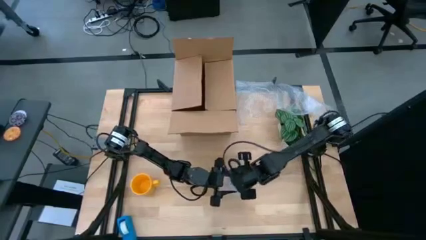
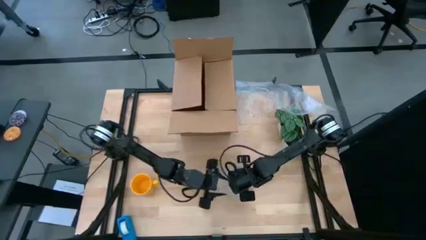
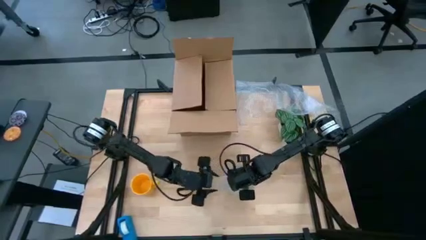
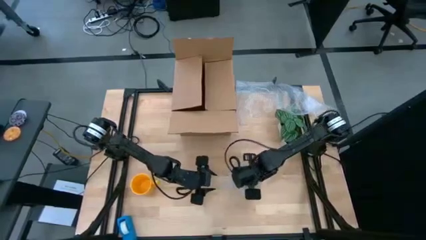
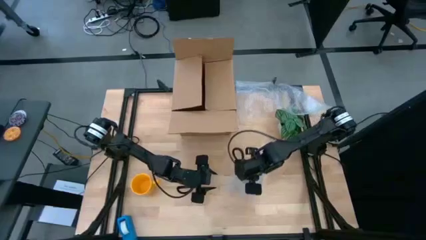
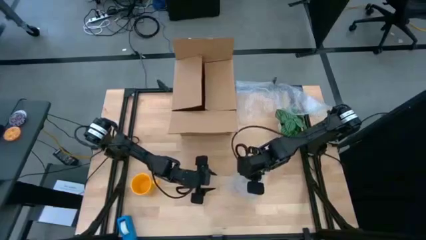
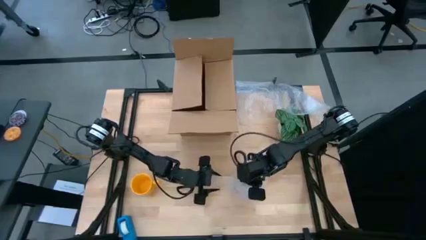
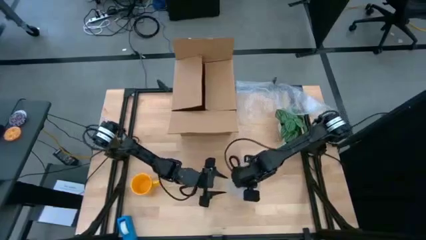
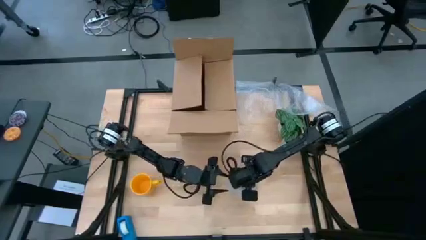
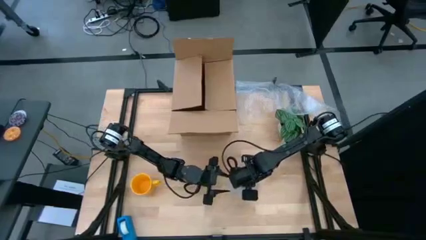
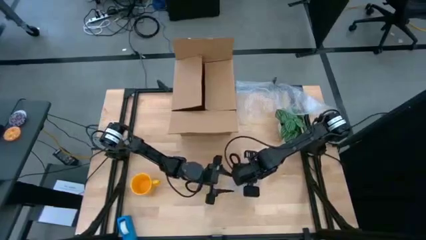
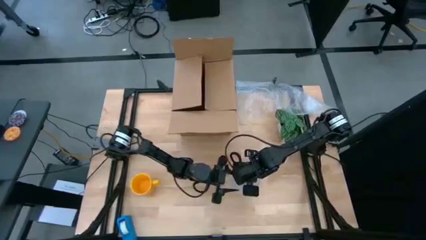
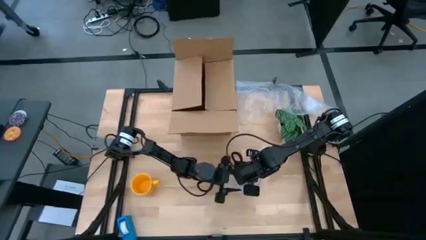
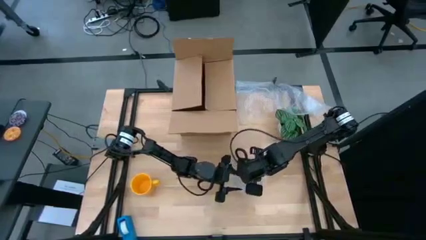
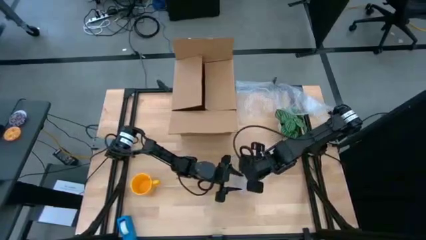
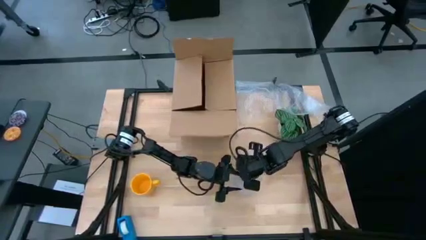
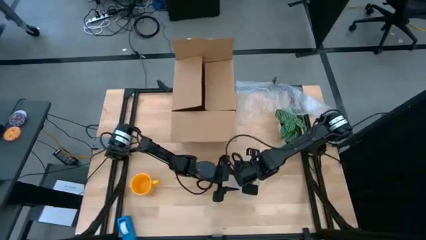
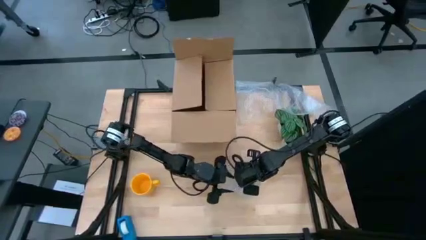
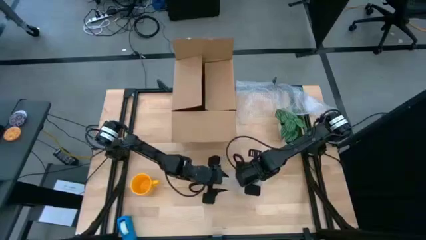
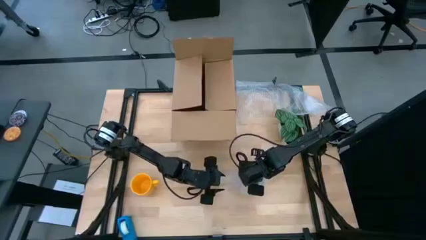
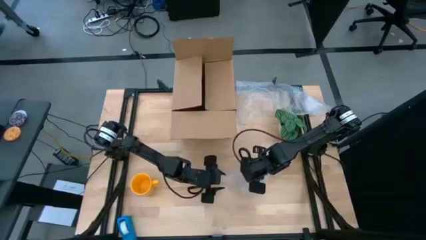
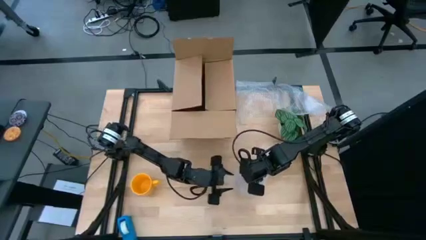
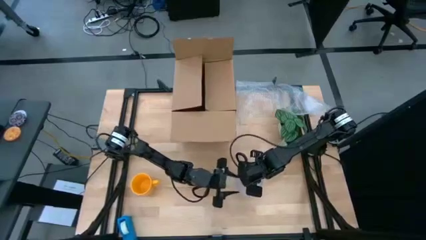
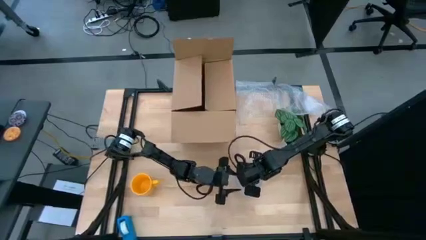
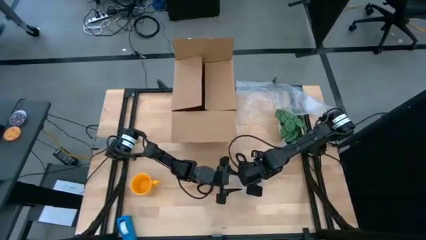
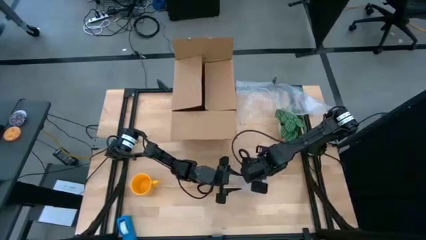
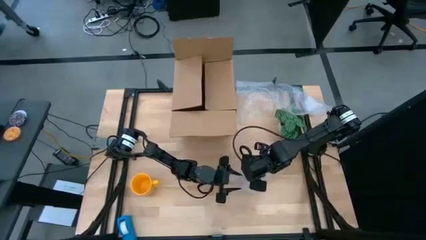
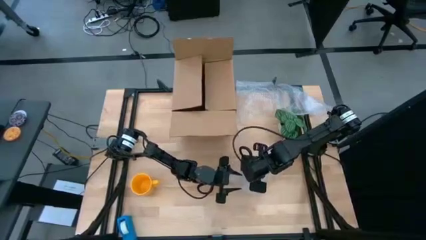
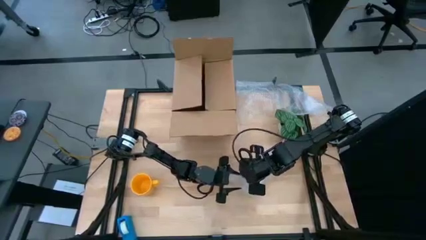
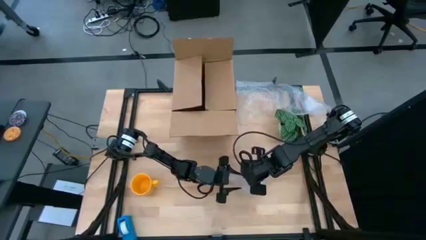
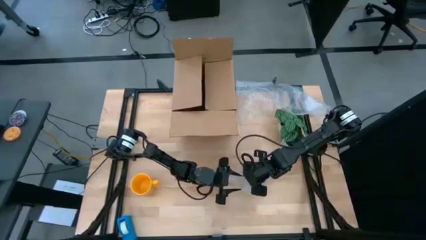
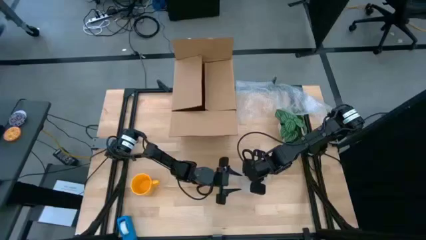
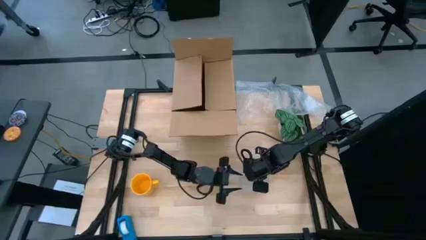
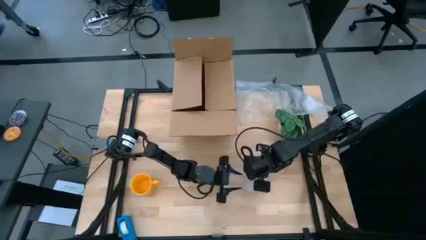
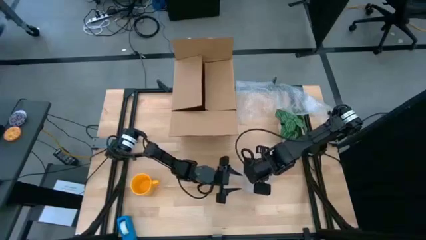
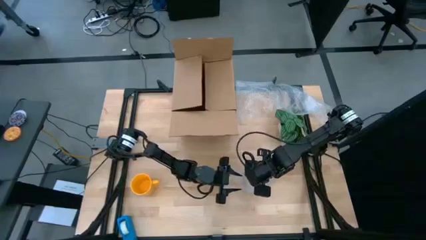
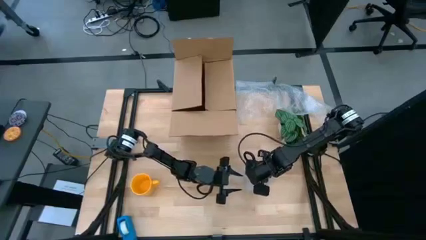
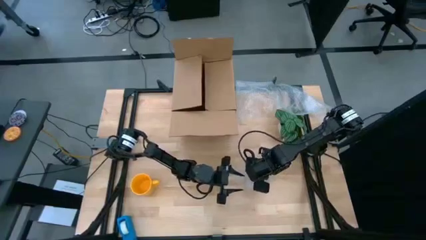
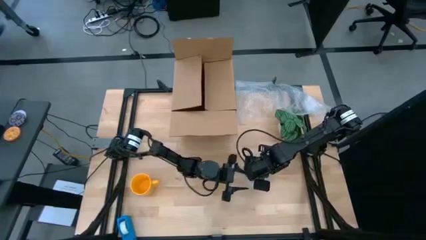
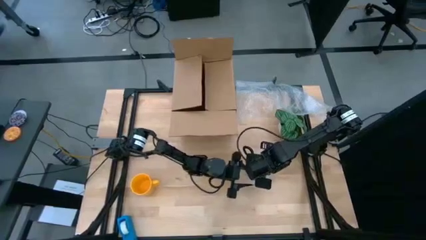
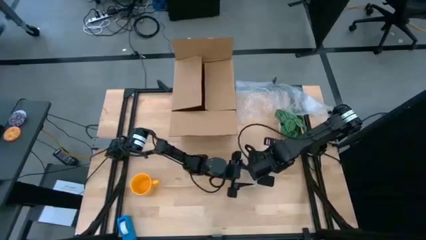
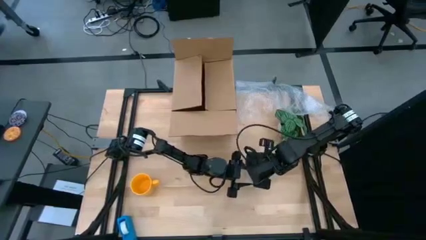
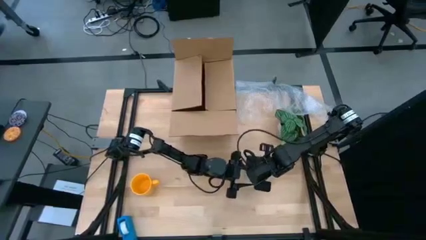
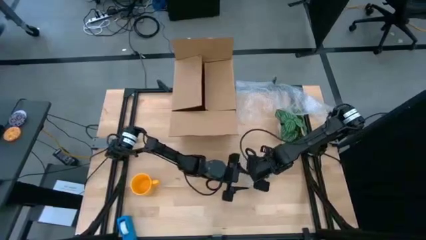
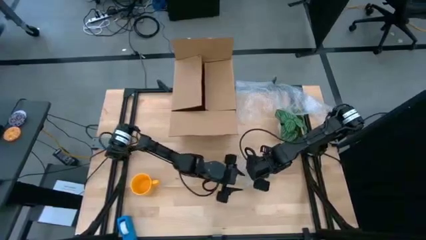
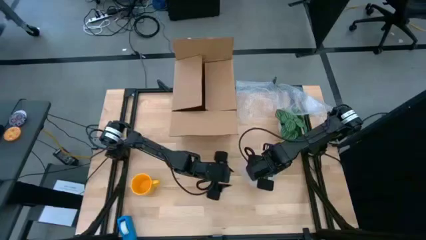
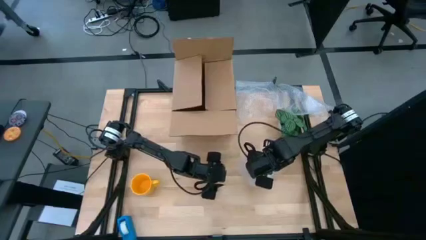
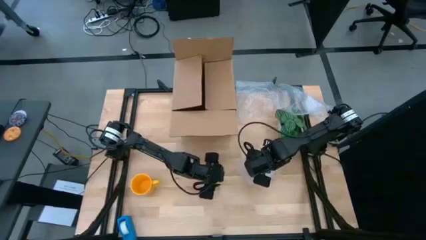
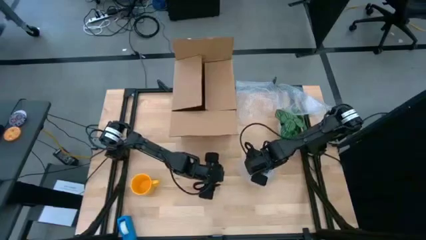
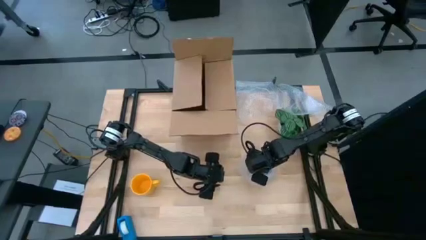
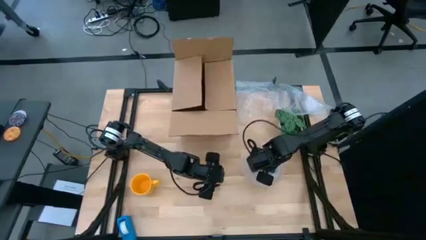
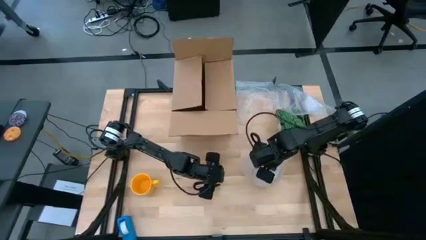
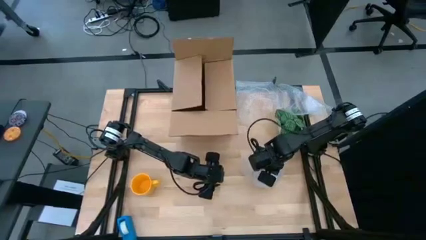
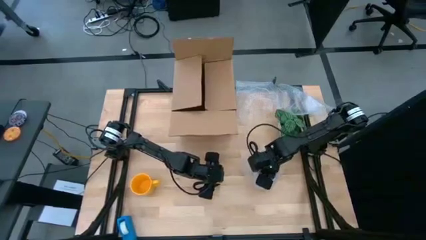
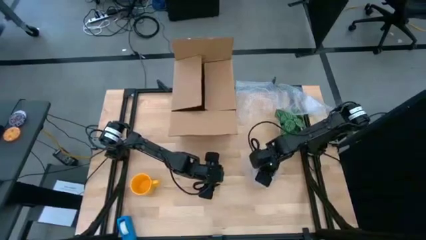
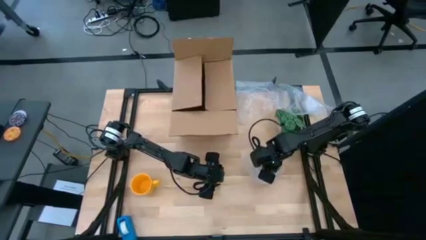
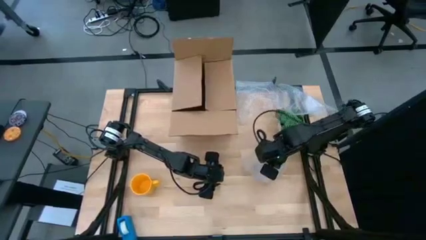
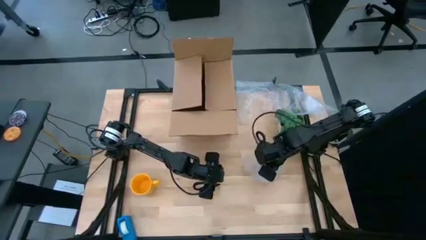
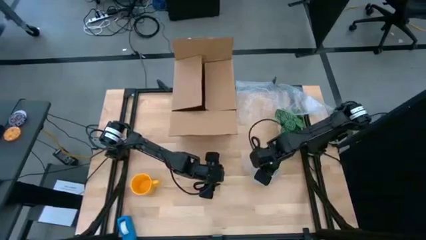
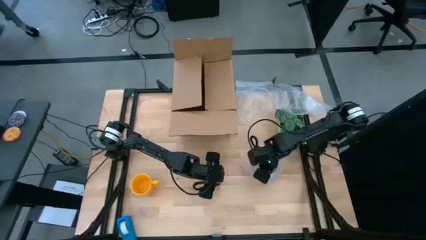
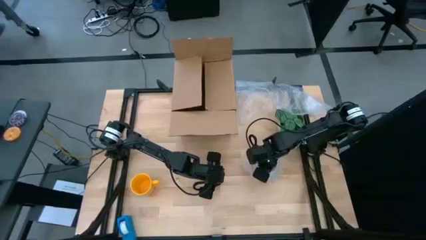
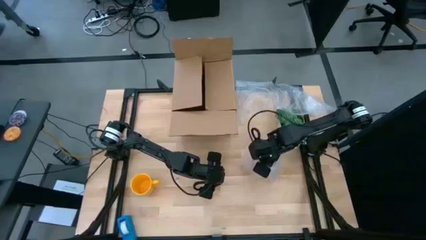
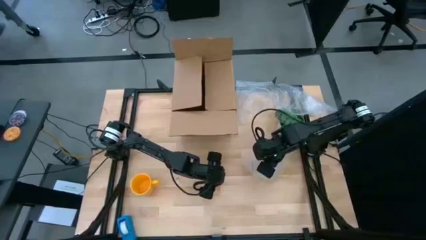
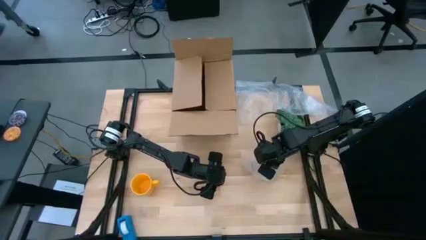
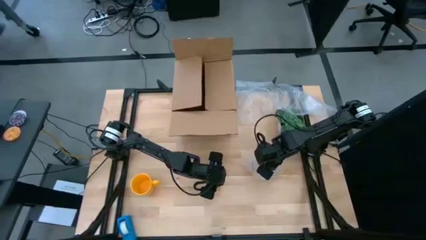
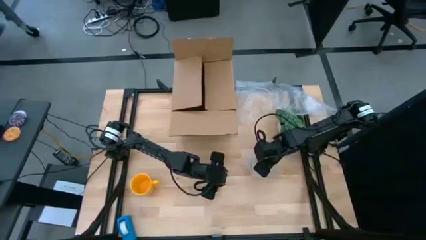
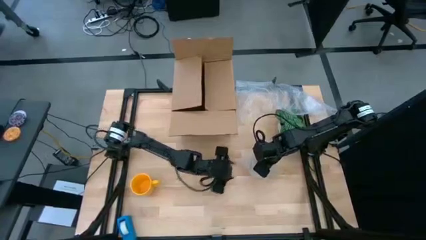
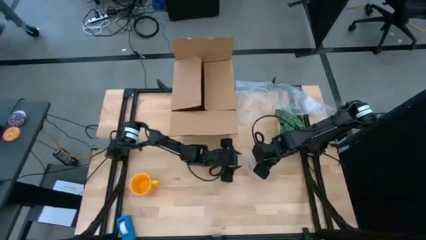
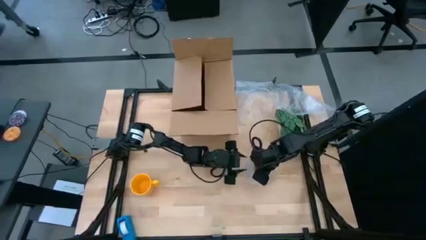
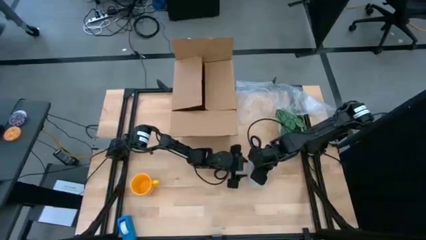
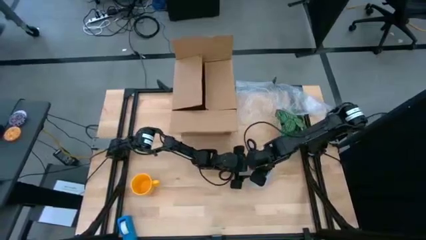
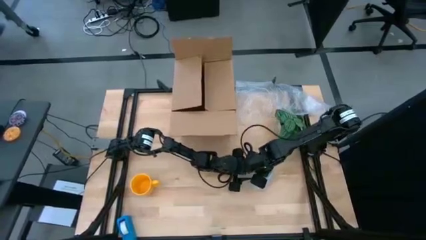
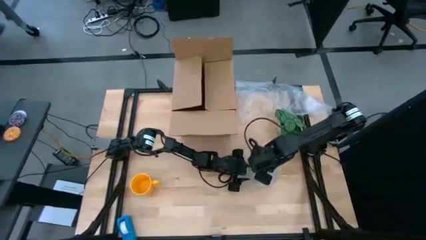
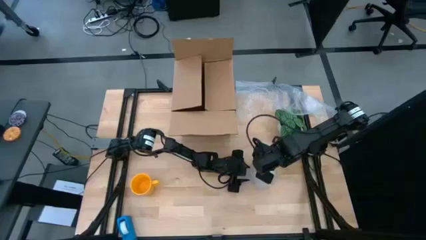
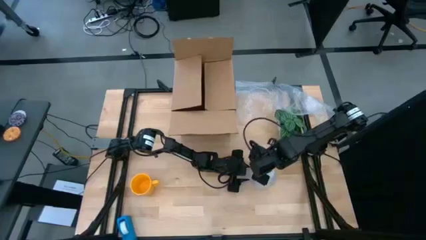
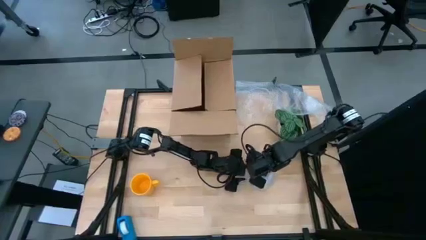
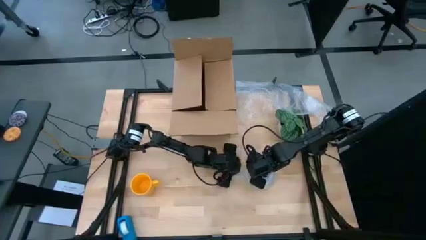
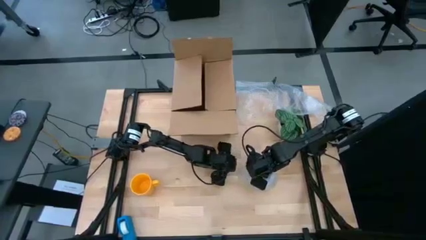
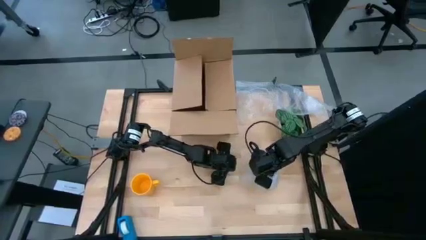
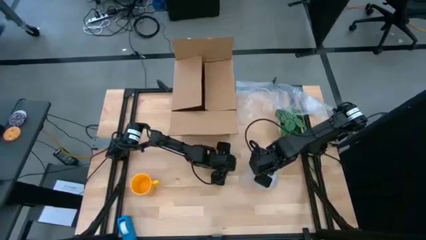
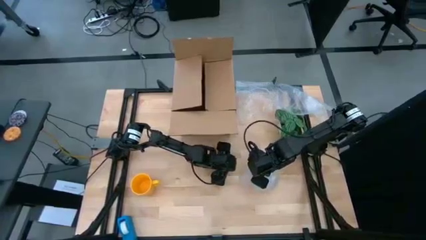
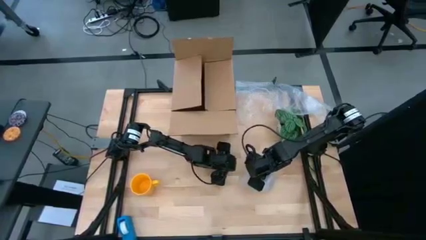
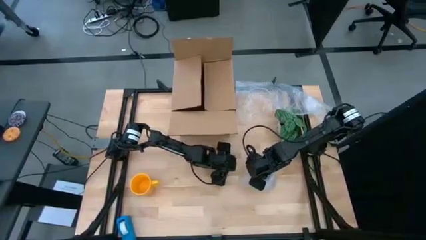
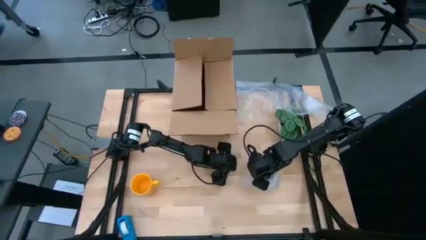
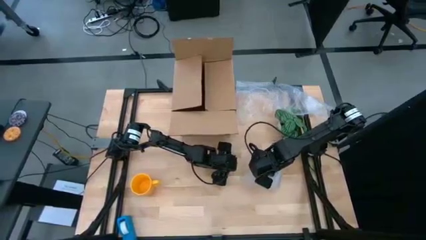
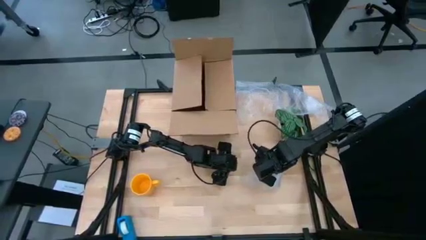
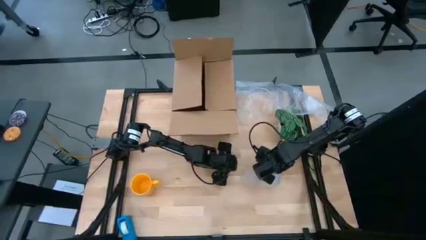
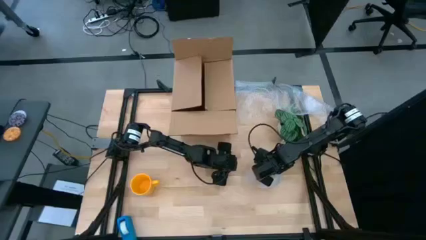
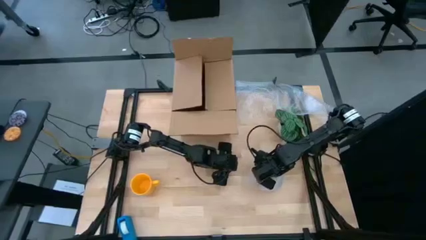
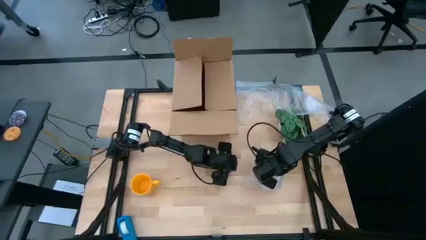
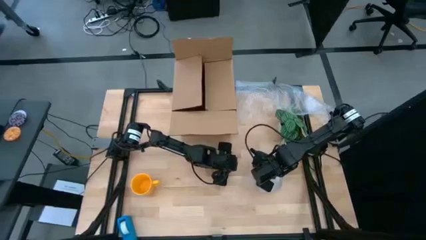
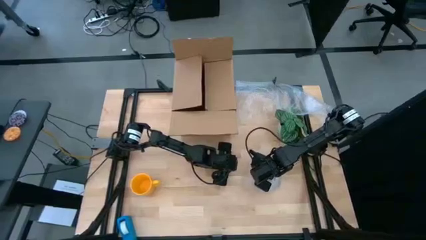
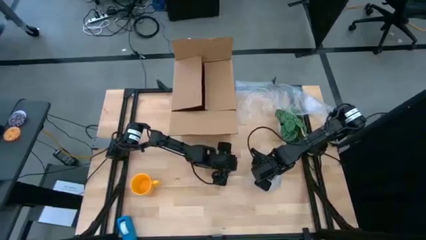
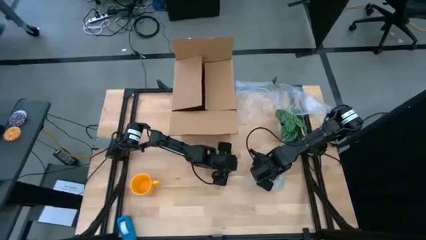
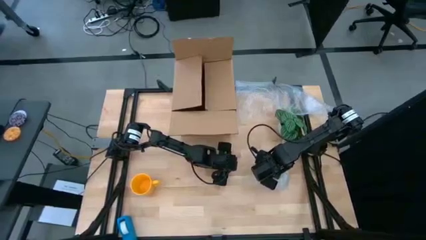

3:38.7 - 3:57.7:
Task: wrap mug
Wrap the orange cup with the bubble wrap
